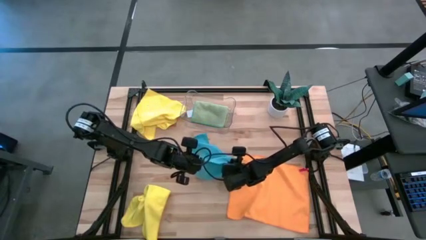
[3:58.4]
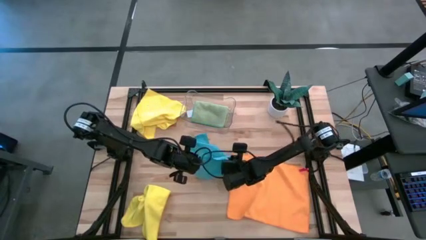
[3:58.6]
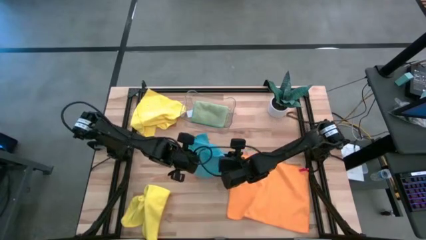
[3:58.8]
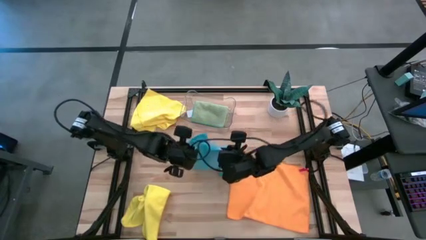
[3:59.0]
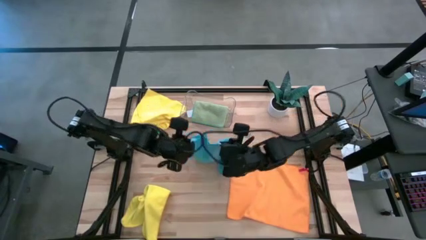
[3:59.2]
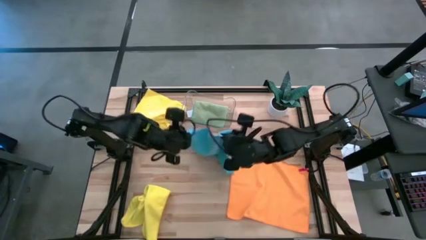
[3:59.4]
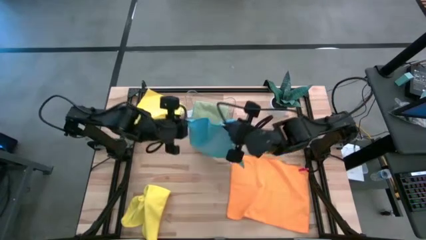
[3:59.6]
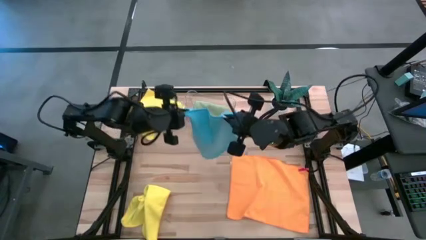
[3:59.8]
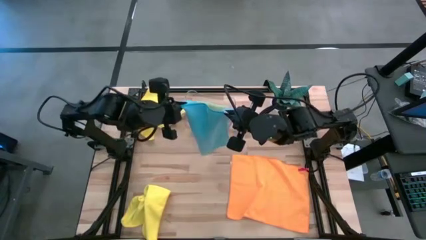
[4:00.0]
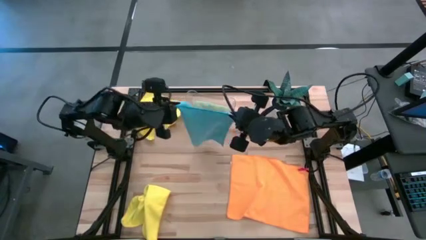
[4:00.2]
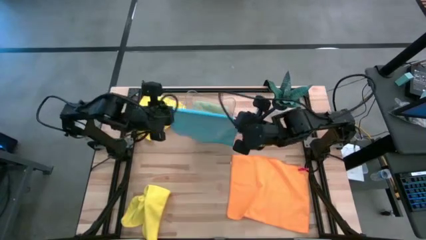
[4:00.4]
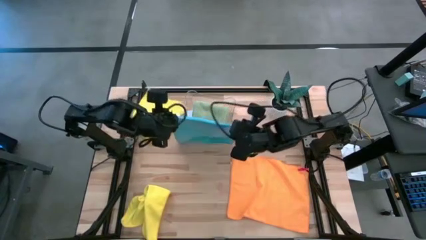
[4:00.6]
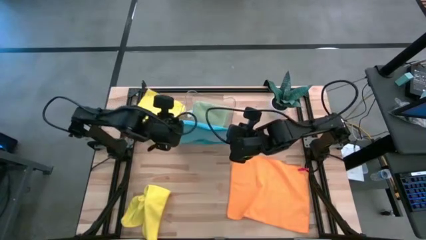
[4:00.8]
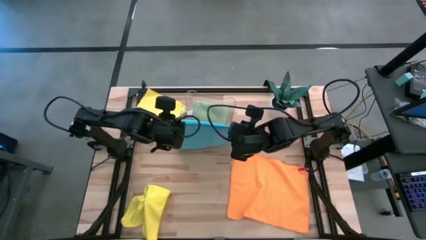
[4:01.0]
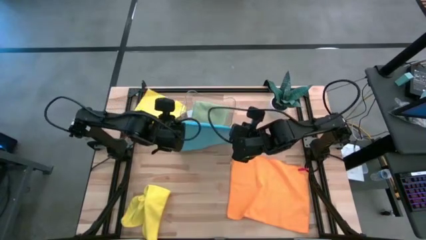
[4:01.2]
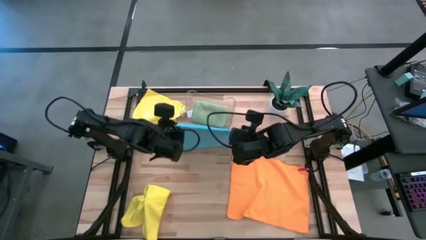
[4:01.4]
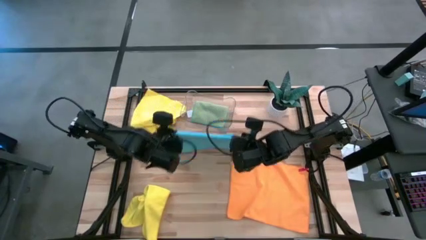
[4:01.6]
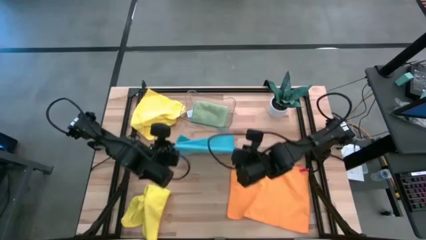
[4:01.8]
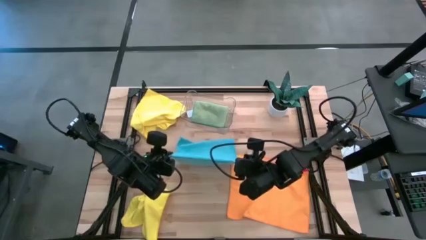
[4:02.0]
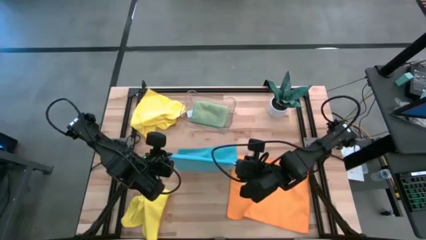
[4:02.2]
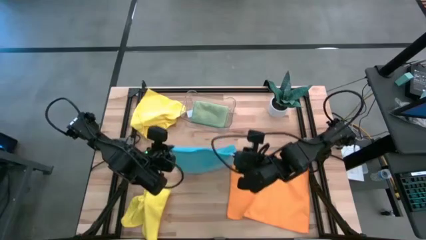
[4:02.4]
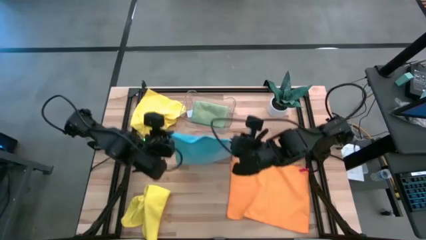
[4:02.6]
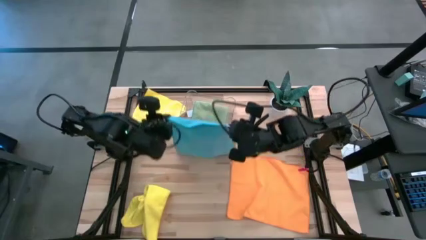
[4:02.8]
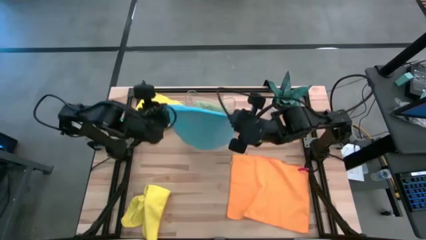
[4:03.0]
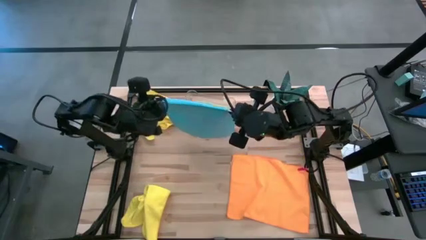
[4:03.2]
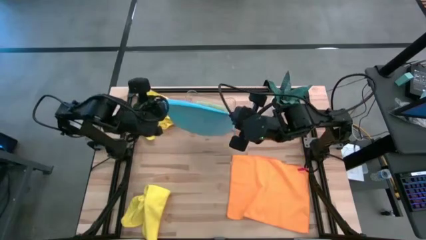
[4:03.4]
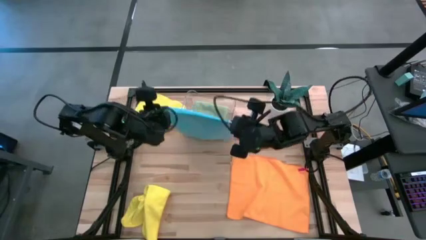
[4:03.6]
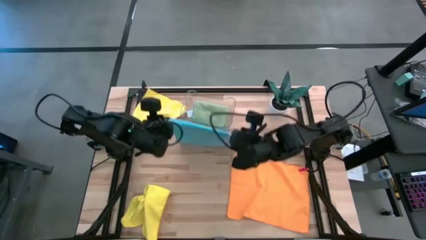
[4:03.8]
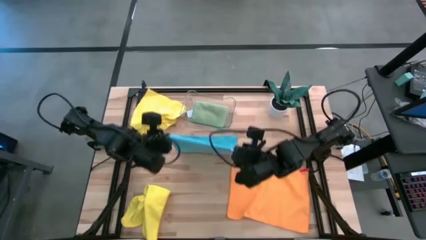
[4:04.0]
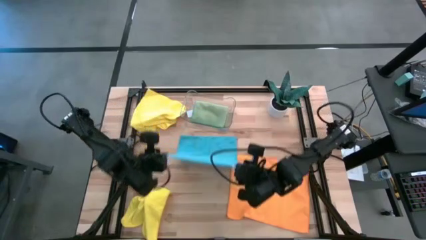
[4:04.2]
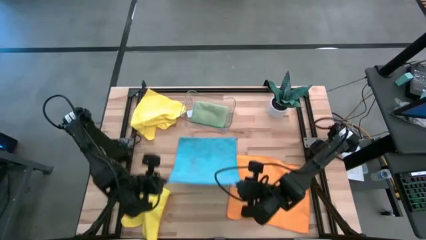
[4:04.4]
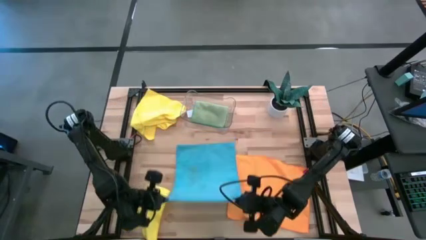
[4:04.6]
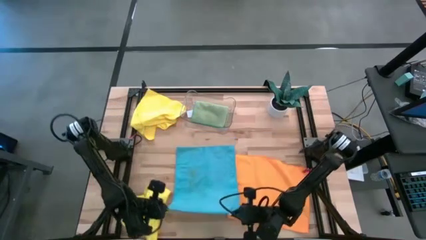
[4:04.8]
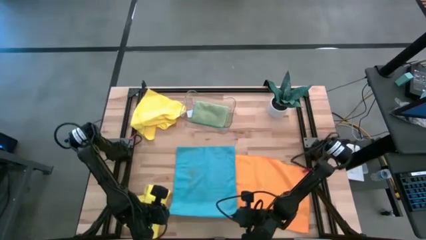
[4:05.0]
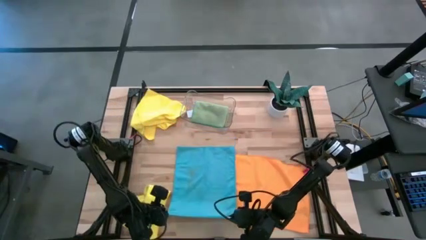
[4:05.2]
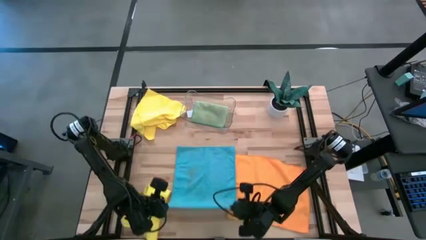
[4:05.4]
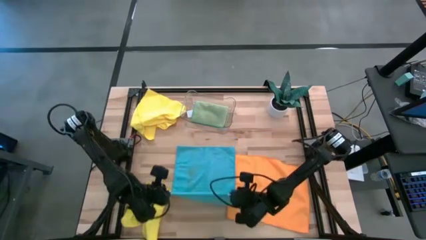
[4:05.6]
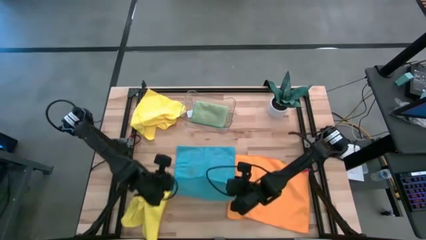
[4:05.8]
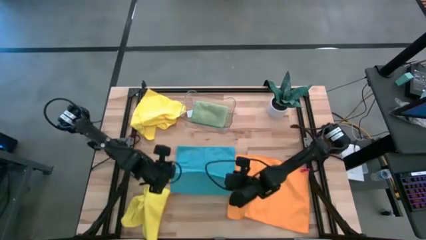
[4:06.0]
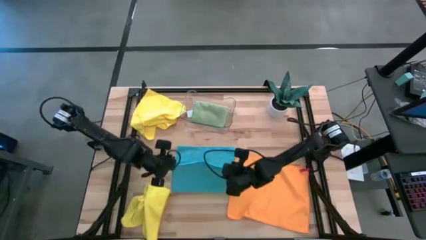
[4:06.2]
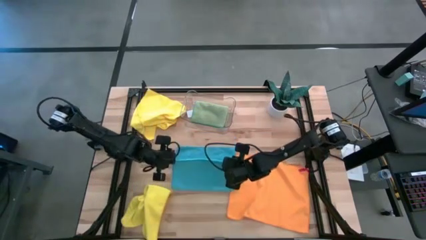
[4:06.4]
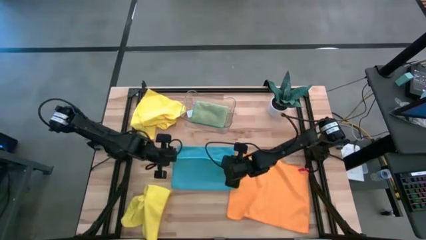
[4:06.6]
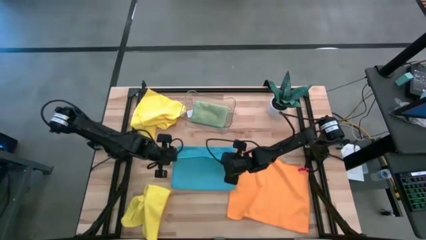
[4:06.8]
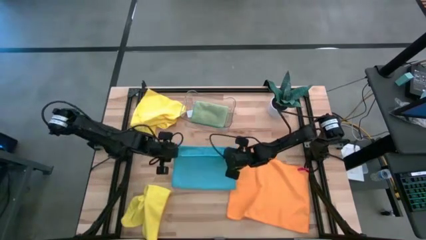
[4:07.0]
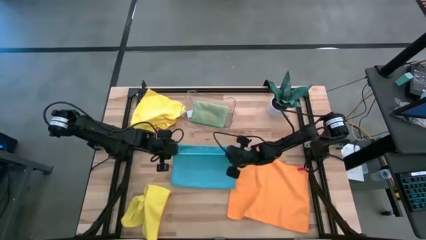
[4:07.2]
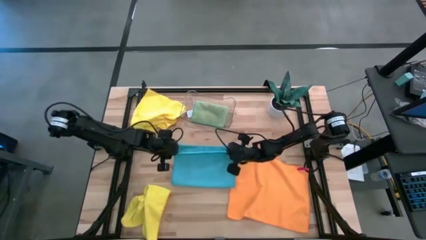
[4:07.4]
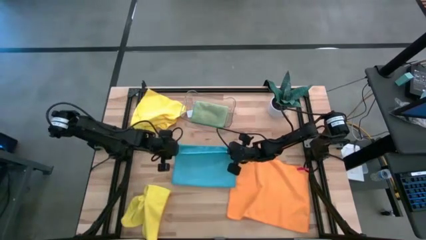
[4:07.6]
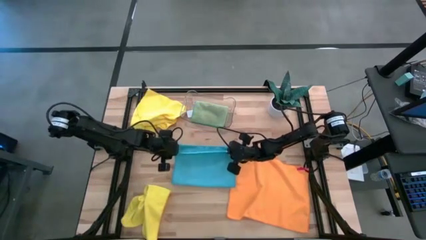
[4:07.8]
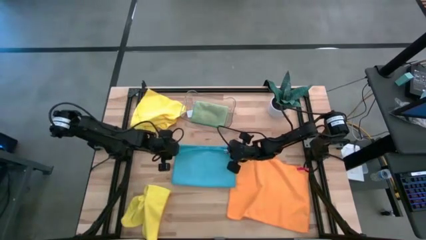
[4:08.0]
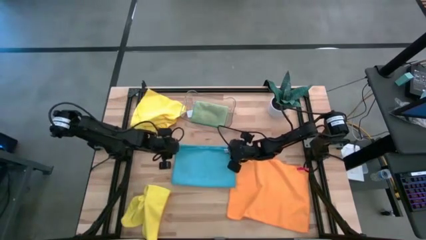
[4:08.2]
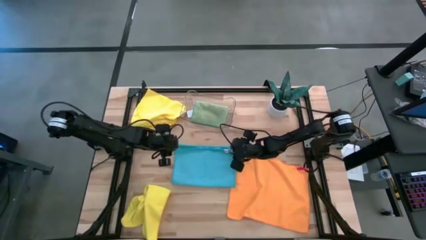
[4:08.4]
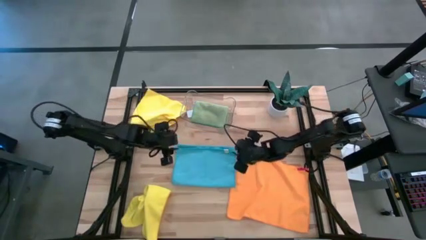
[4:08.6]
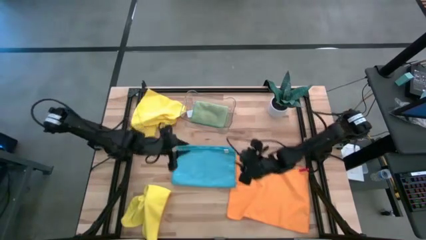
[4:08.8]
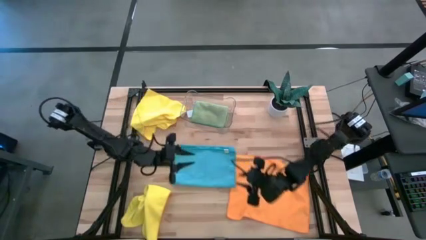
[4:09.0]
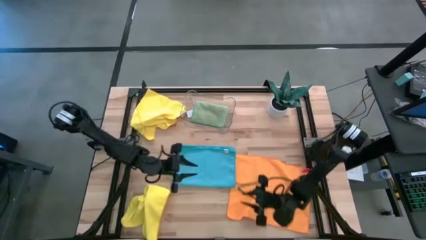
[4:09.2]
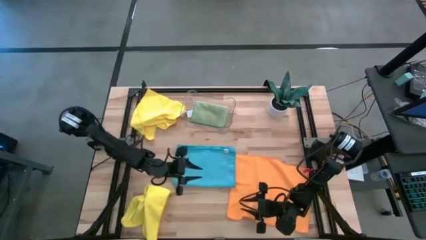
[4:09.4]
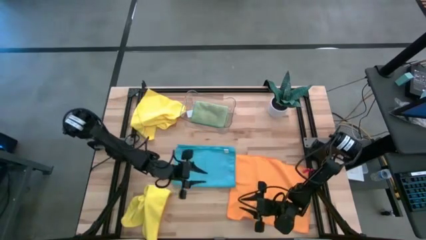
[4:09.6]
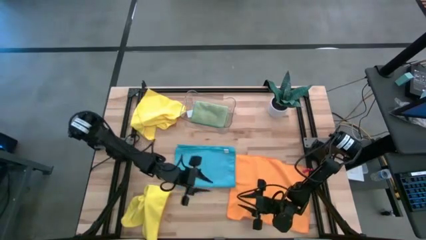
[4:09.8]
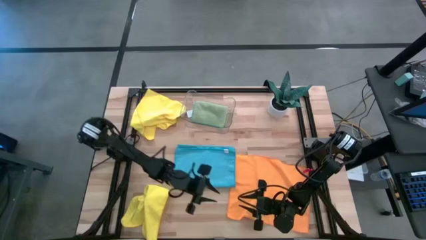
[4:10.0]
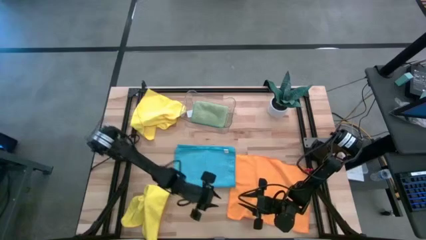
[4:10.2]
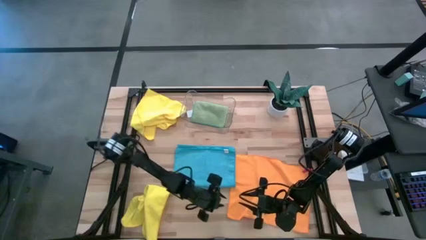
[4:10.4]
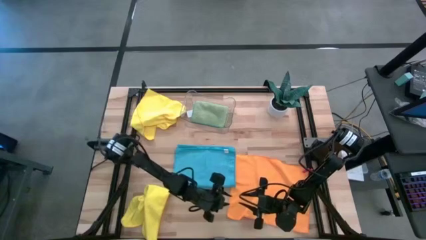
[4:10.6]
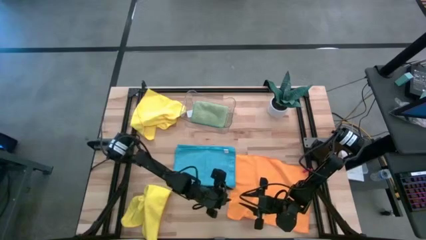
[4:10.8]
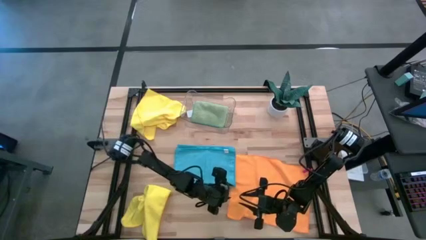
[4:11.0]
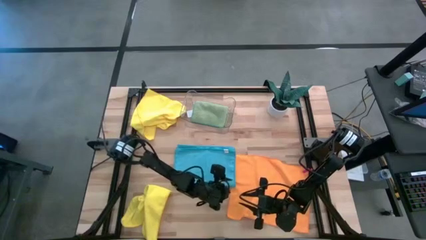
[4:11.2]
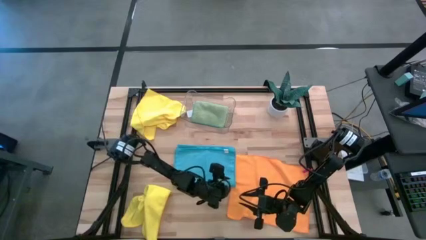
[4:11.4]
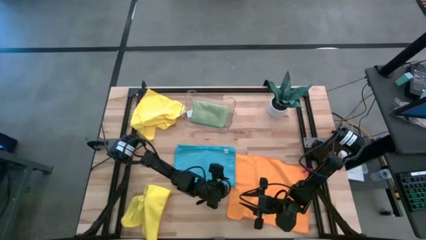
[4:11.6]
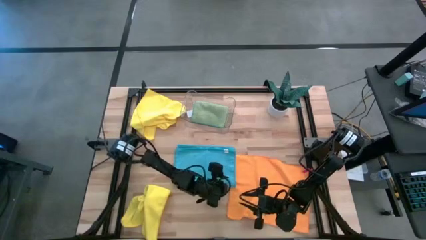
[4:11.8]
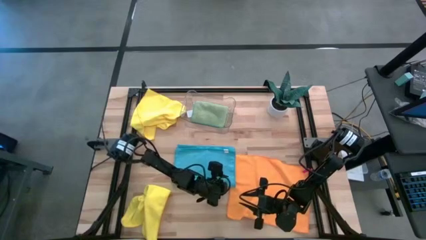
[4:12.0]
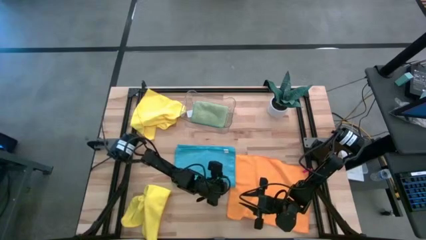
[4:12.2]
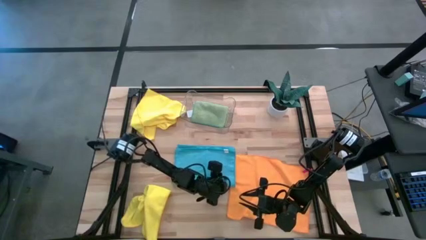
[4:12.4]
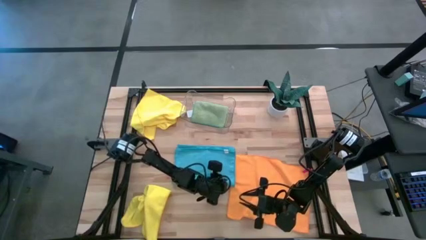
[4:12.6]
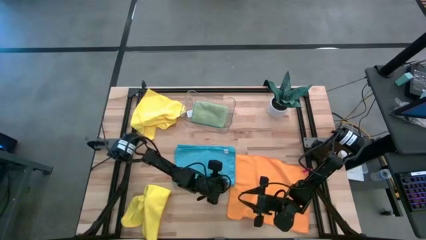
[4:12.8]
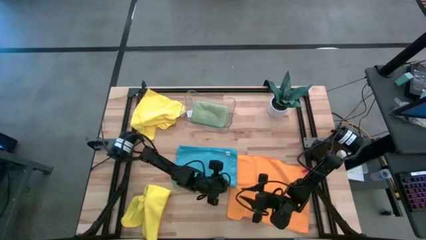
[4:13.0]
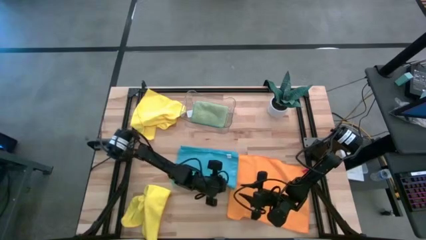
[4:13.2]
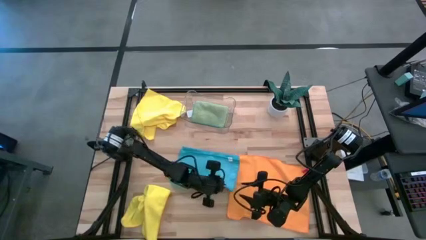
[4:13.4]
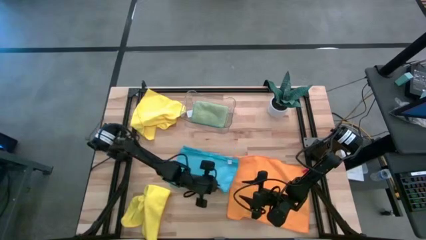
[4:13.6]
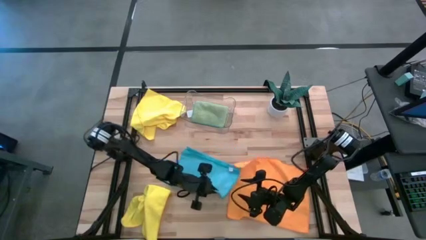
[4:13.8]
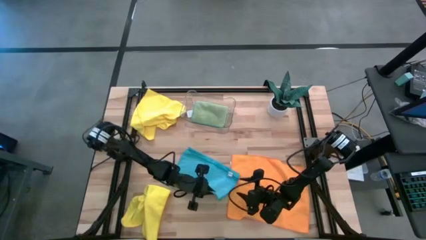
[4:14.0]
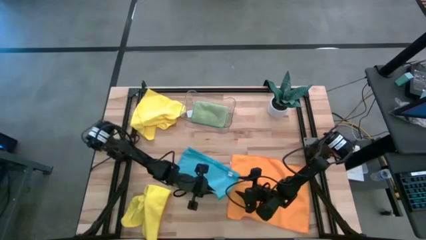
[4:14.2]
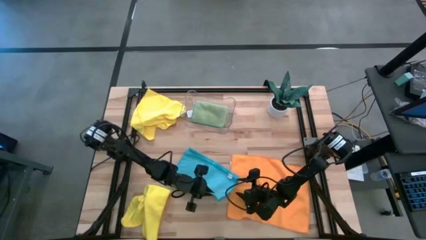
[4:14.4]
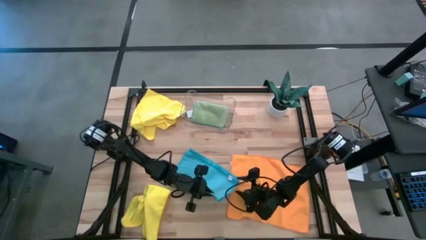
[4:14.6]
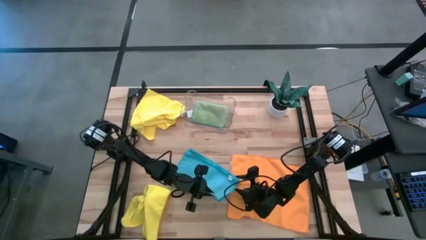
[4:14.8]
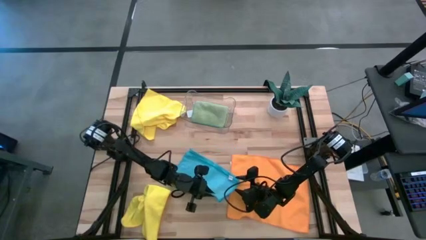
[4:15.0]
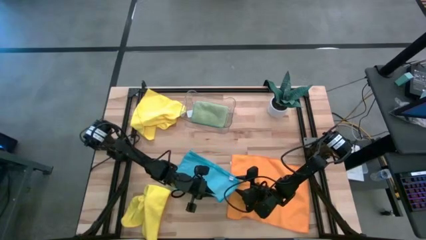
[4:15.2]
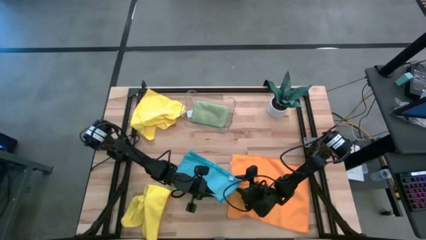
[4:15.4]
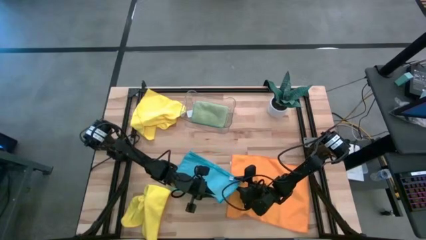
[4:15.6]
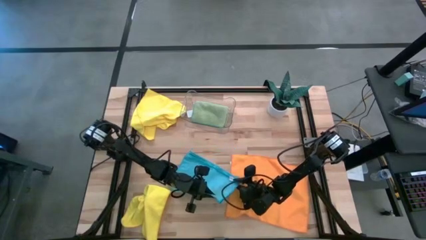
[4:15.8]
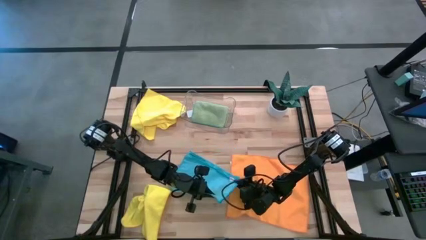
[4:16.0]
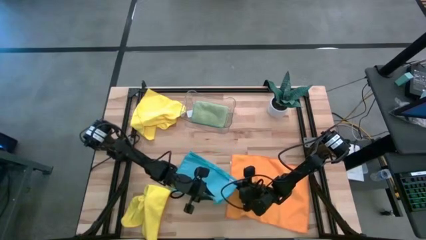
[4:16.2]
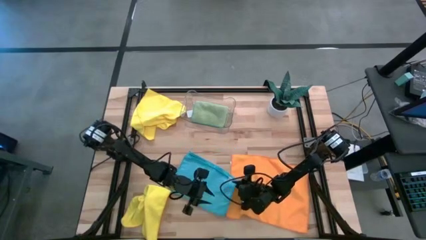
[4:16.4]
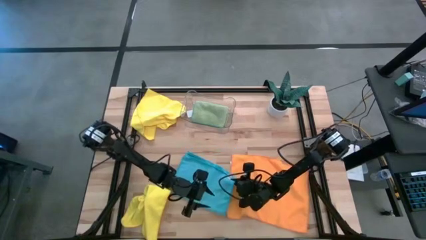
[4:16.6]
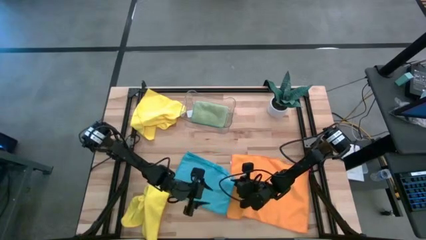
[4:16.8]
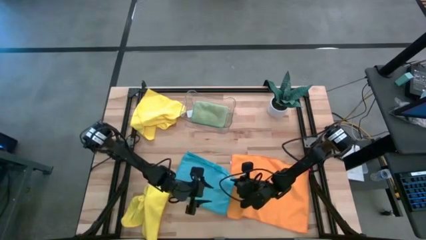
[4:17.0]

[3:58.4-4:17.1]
Task: Fold microfiber towels
Fold the blue towel
